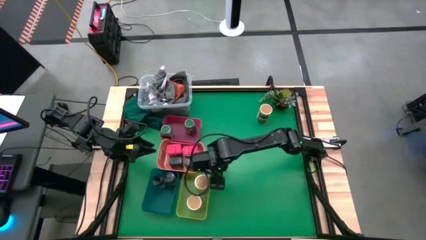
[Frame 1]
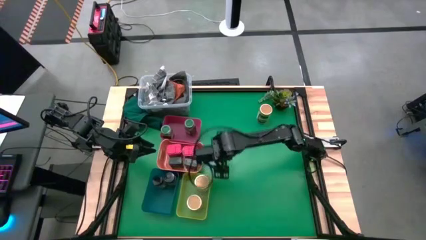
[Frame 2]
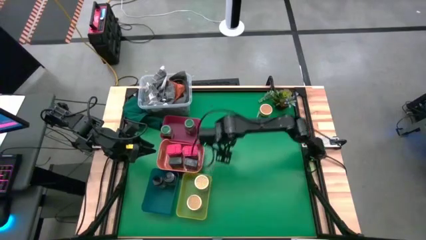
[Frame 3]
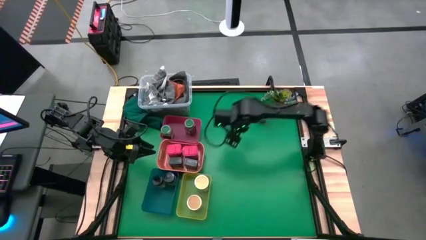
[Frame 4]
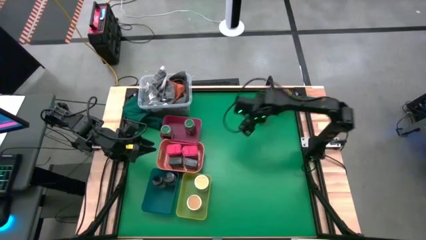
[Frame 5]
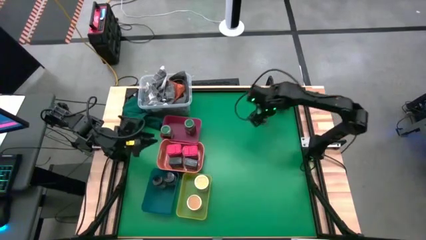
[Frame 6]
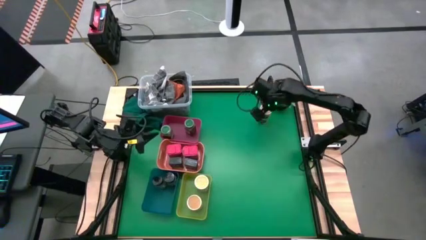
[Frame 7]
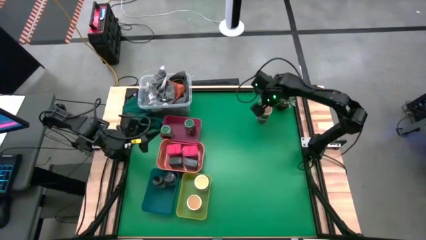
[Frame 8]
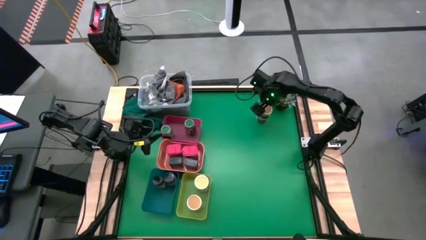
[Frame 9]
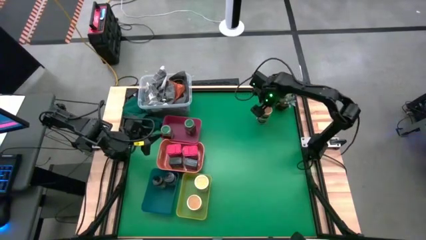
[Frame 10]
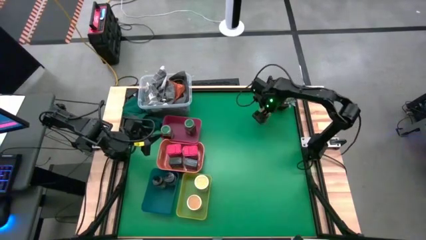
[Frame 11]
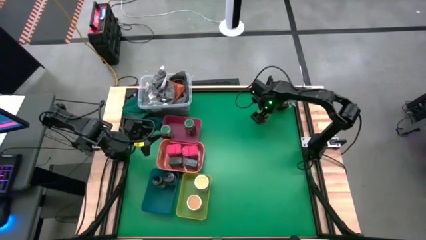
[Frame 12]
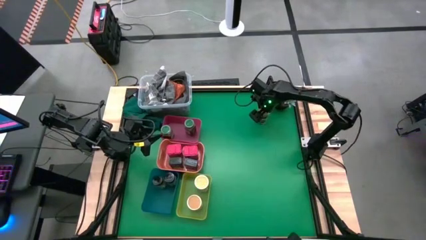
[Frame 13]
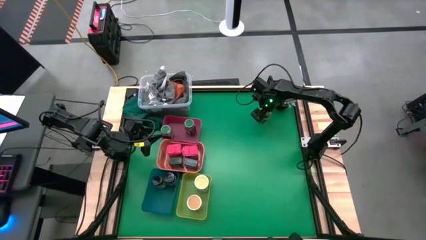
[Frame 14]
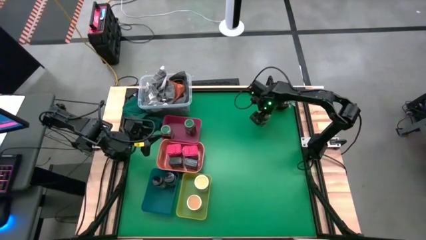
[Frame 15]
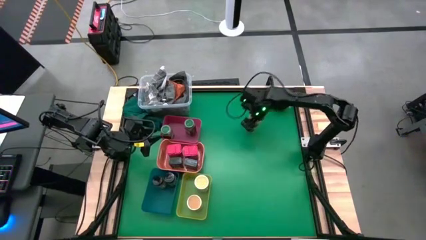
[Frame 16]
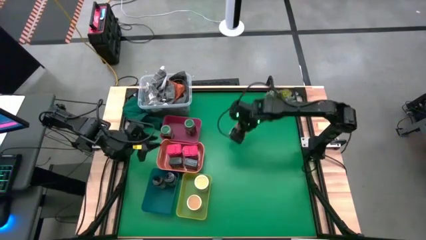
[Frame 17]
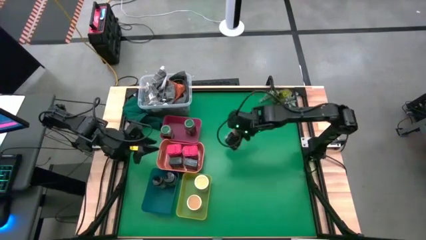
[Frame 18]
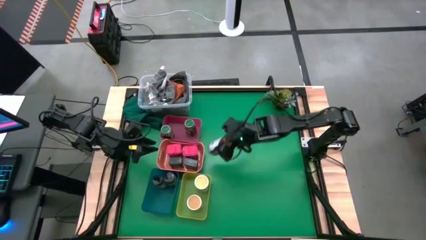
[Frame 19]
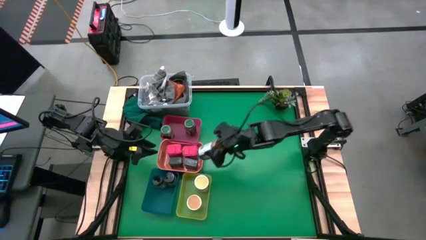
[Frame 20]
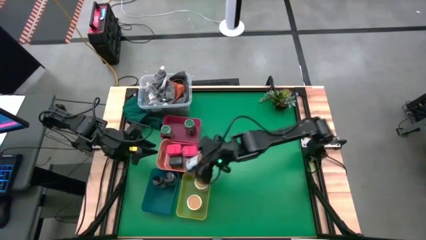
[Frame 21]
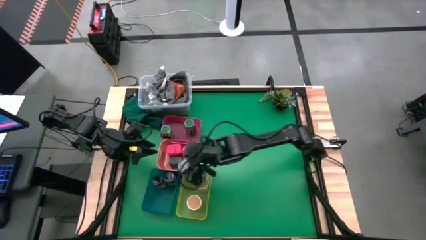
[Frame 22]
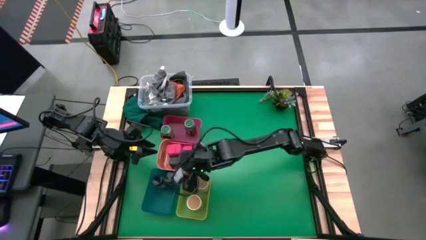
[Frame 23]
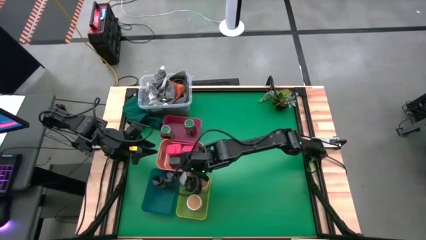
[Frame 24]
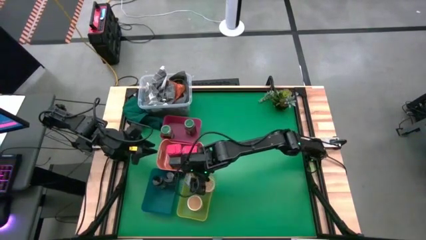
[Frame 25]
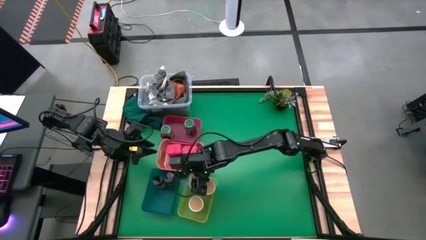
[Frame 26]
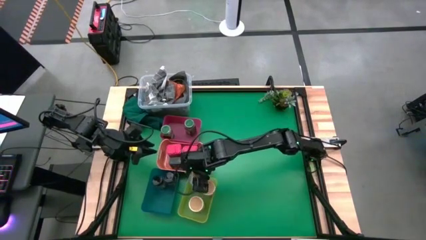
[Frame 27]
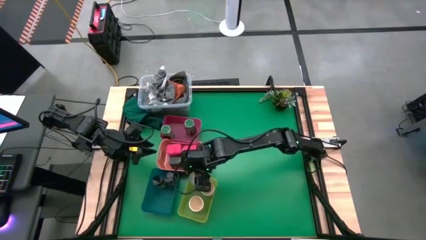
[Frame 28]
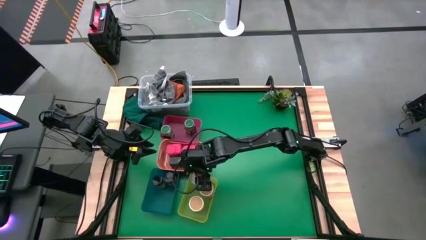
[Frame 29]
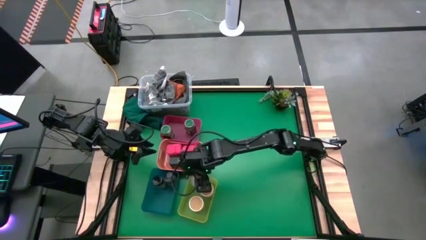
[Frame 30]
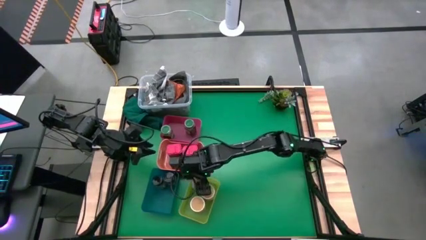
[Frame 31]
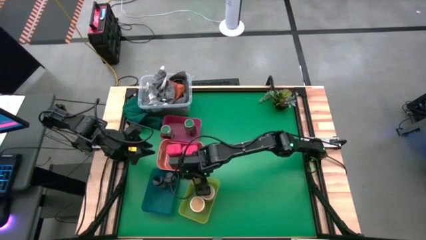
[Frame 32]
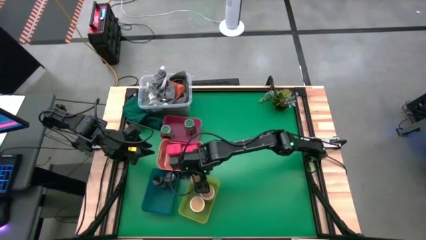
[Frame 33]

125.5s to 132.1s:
Task: Sort spices by type
Put the gold seasoning bottle into the yellow bin

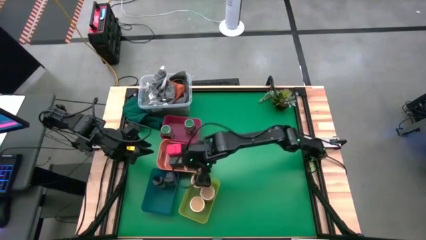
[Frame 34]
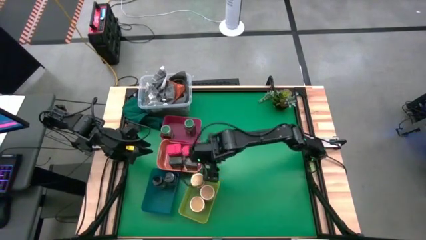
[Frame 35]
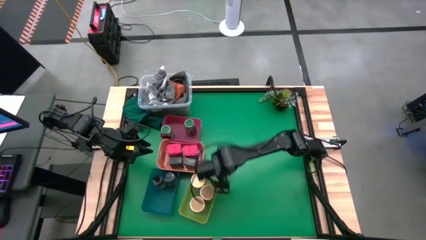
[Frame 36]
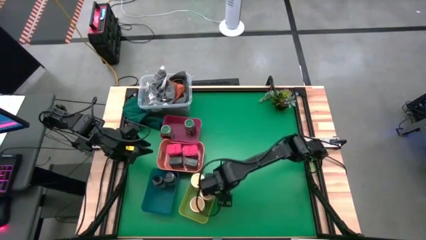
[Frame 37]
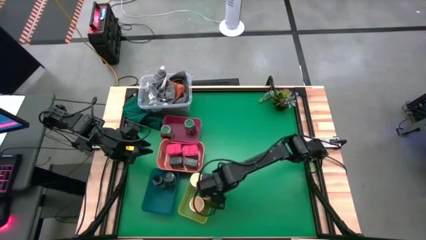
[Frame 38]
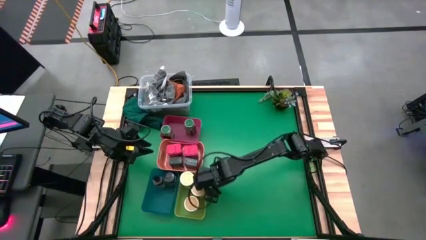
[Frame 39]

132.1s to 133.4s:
Adjust the yellow bin

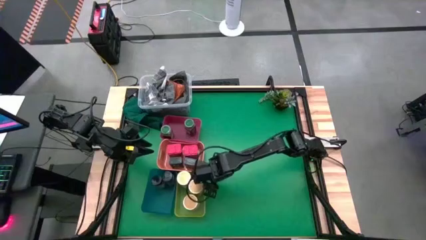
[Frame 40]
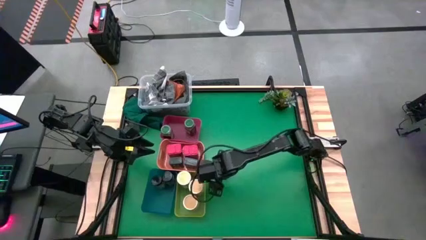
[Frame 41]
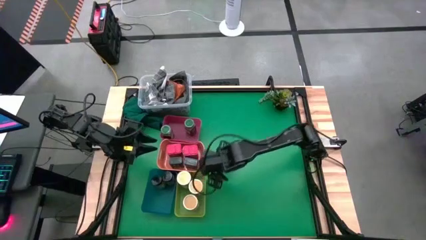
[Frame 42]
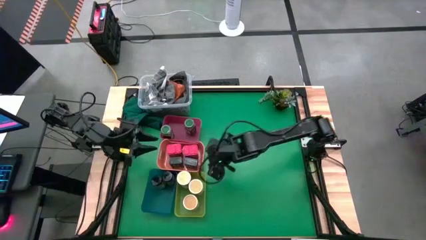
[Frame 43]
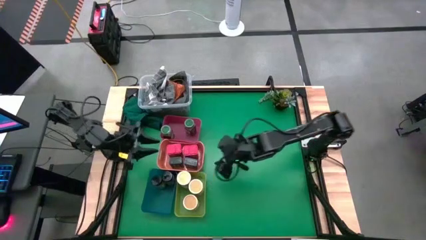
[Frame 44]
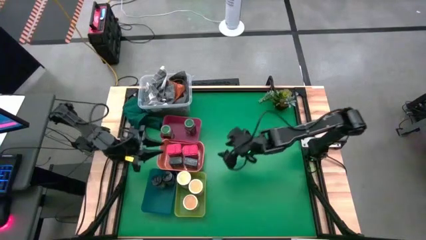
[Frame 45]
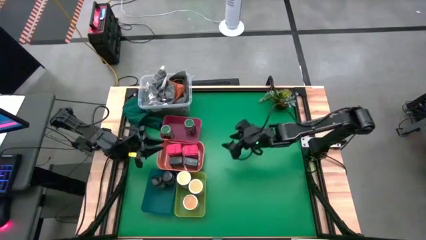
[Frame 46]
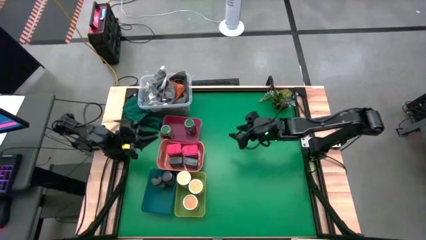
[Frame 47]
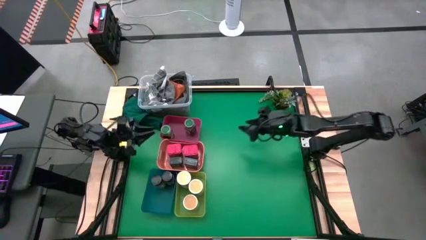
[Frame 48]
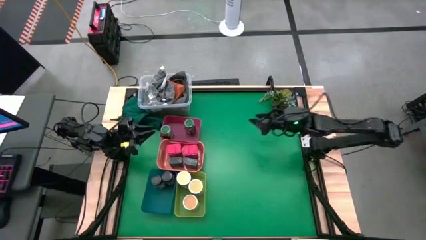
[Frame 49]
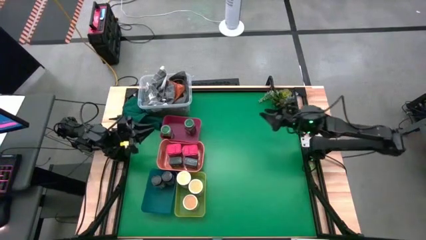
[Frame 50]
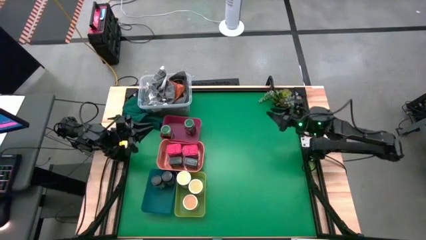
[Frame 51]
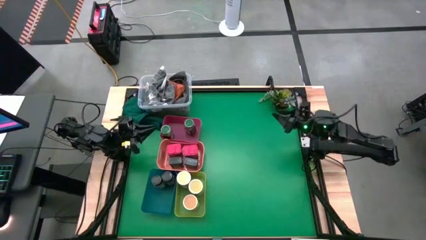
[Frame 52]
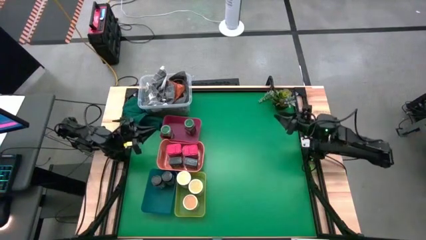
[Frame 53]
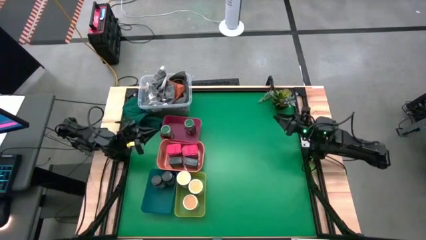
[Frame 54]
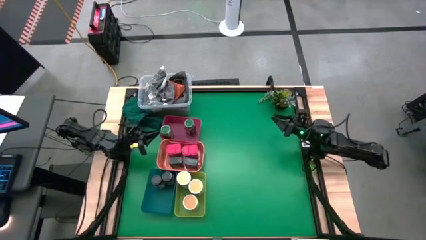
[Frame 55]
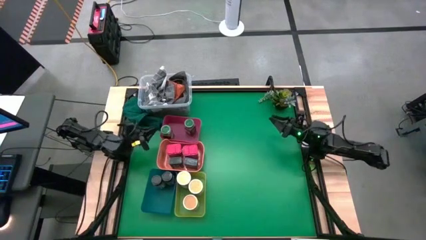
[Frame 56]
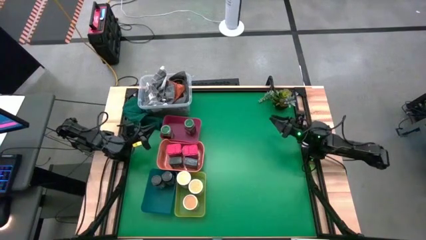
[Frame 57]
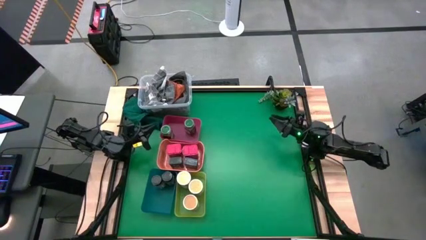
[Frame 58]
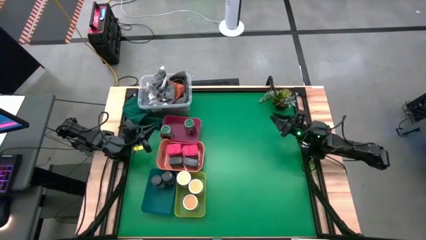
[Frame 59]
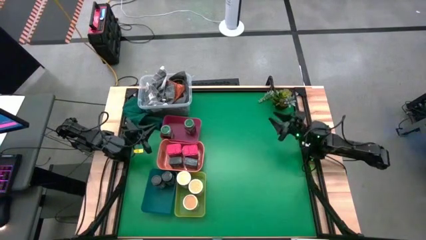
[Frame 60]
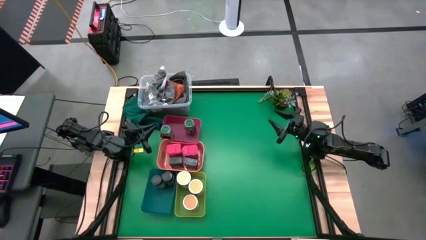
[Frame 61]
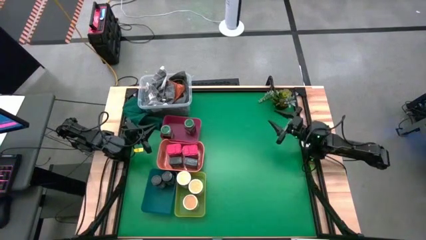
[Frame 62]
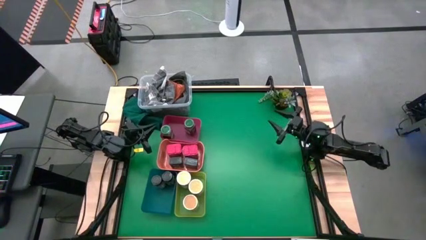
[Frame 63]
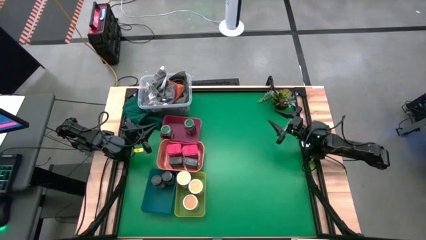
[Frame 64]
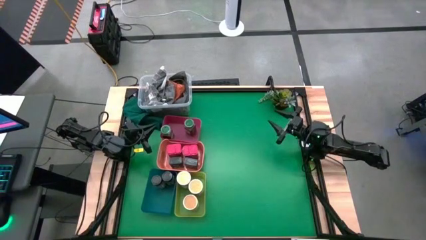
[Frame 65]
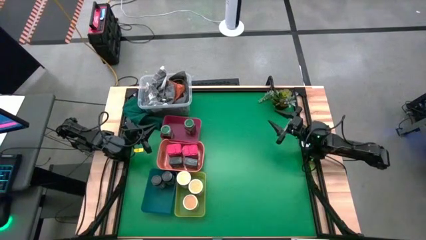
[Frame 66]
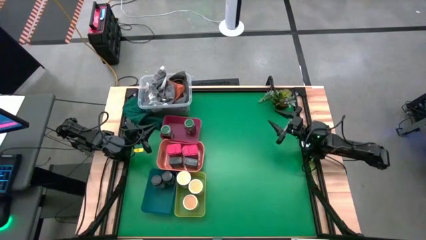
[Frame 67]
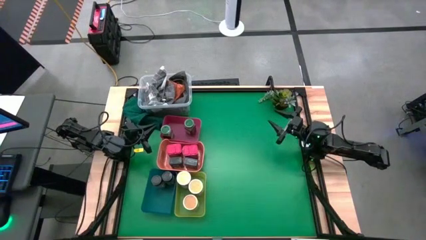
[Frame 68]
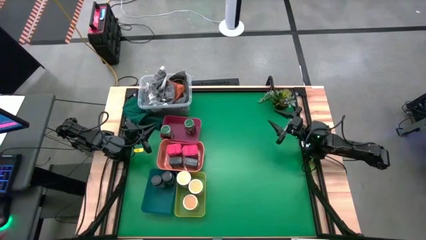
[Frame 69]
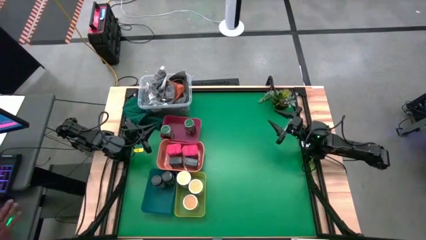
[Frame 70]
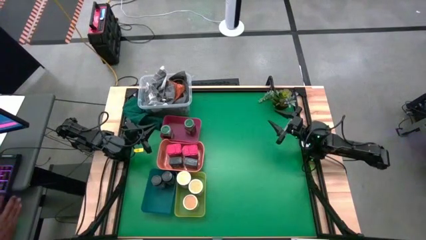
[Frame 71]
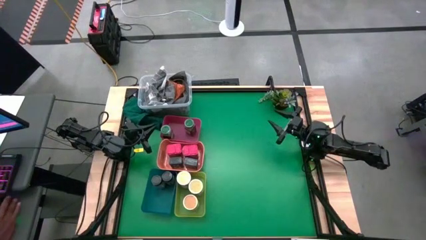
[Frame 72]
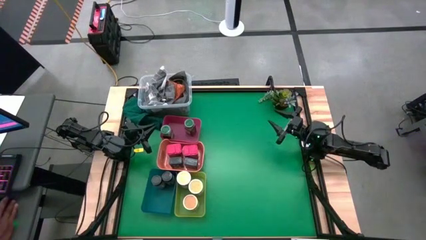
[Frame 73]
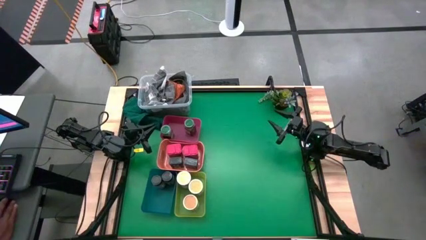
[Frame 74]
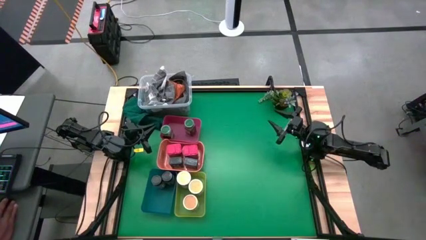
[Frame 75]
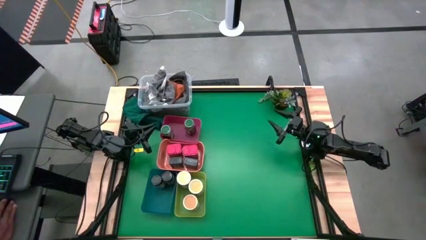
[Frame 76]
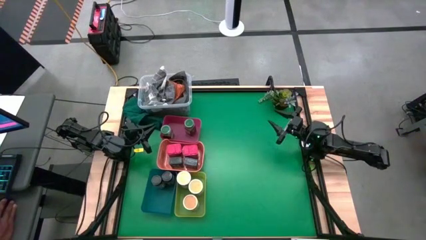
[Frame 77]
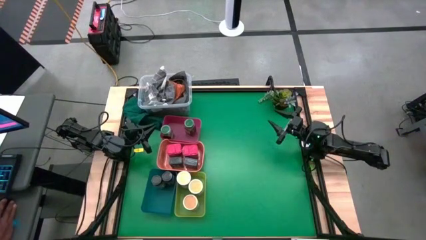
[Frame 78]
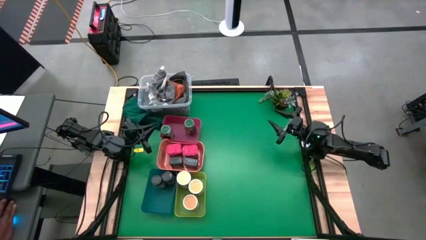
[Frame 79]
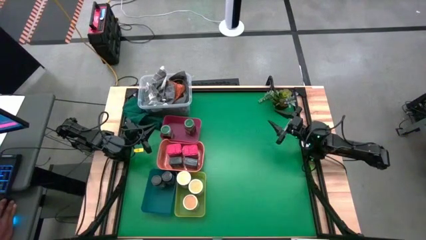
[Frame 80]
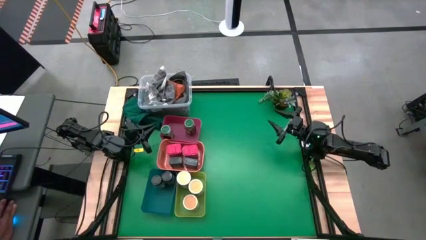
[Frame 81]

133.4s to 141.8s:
Return to Home Position
